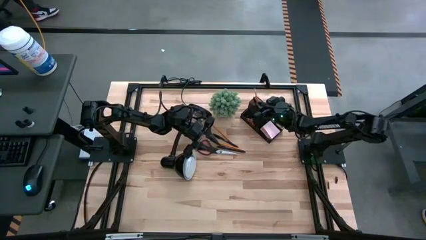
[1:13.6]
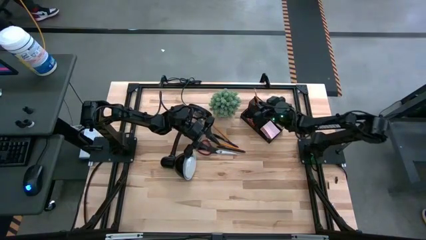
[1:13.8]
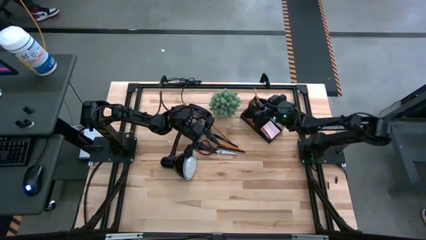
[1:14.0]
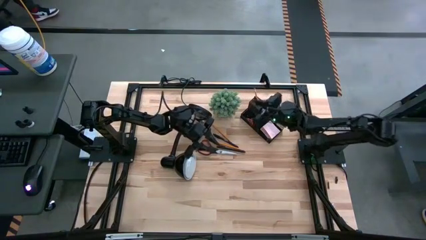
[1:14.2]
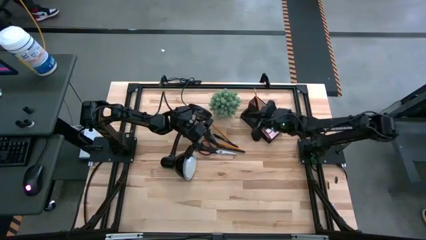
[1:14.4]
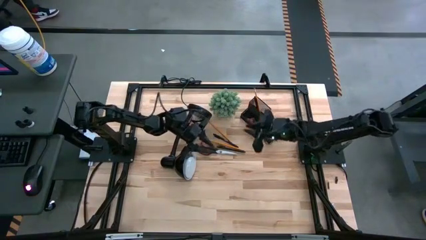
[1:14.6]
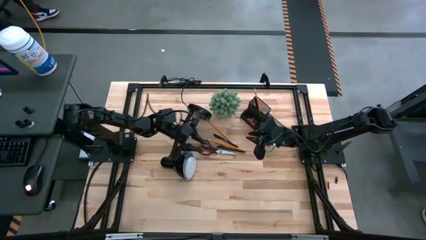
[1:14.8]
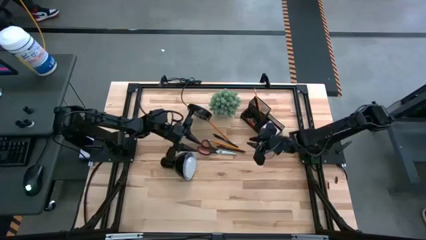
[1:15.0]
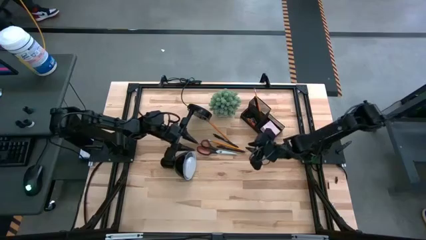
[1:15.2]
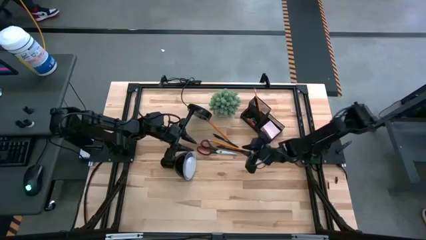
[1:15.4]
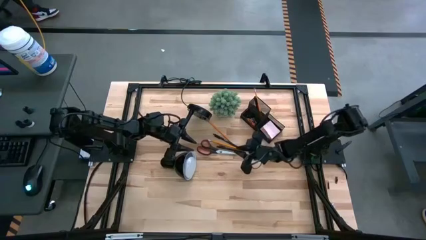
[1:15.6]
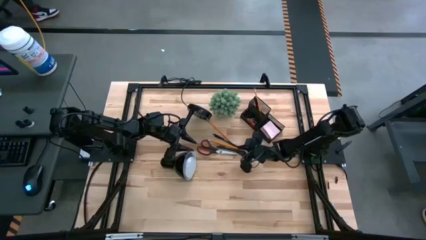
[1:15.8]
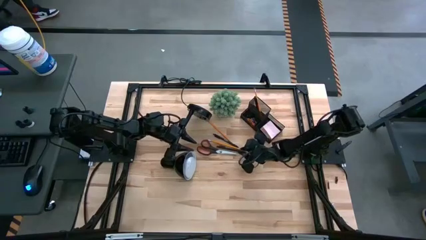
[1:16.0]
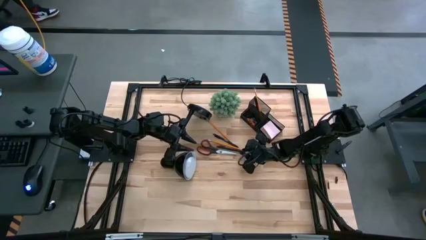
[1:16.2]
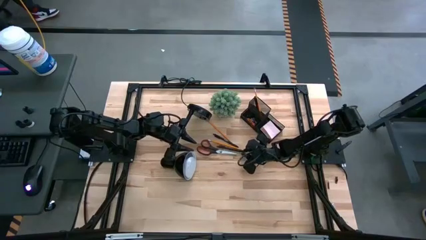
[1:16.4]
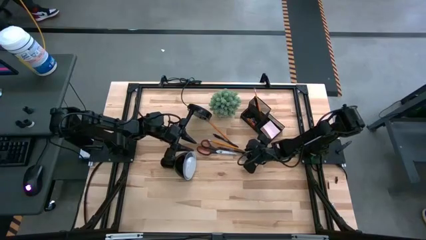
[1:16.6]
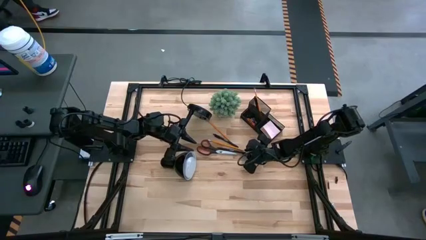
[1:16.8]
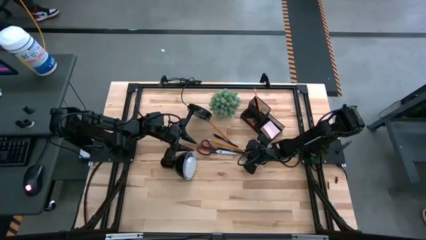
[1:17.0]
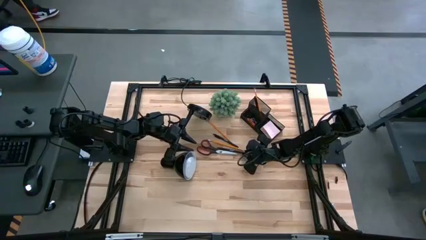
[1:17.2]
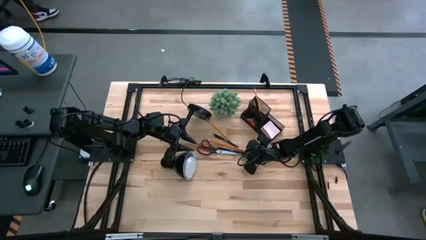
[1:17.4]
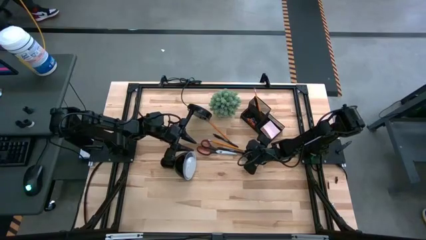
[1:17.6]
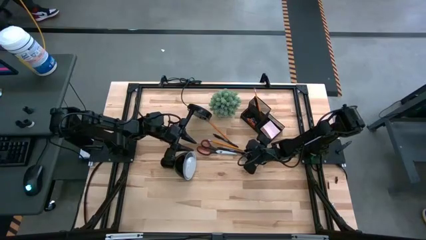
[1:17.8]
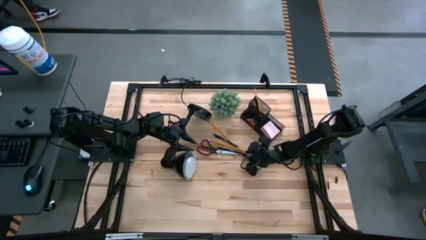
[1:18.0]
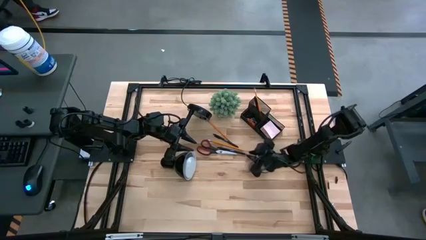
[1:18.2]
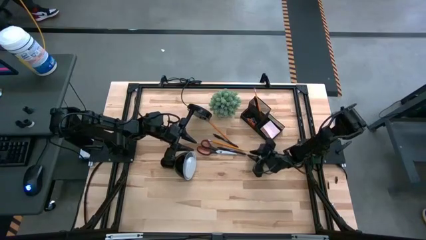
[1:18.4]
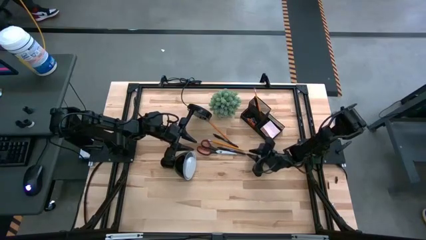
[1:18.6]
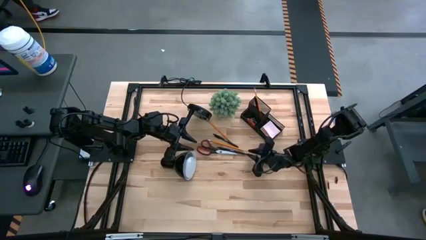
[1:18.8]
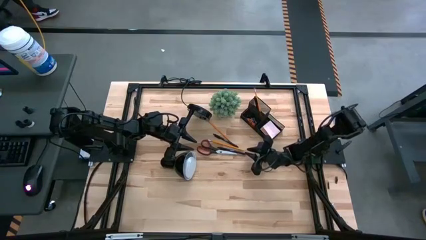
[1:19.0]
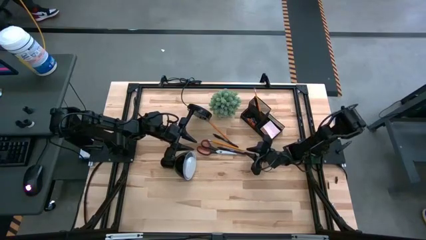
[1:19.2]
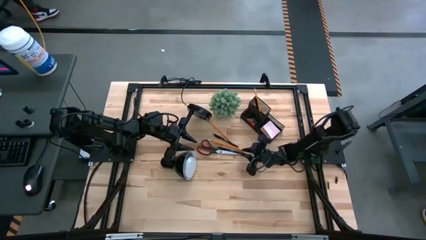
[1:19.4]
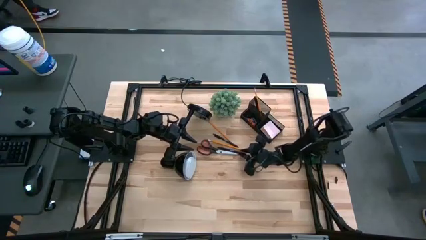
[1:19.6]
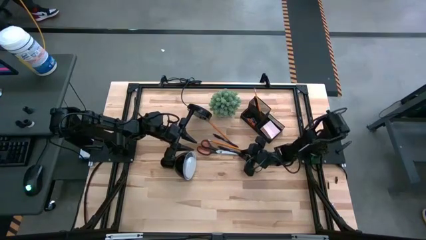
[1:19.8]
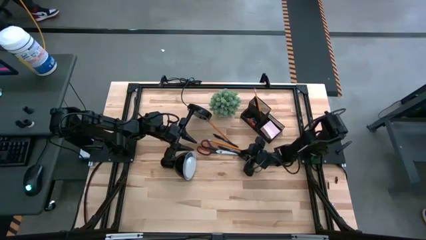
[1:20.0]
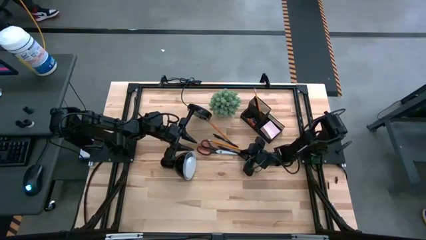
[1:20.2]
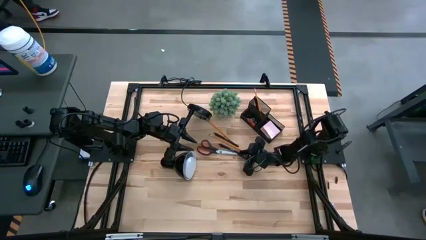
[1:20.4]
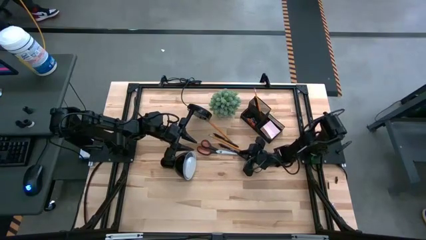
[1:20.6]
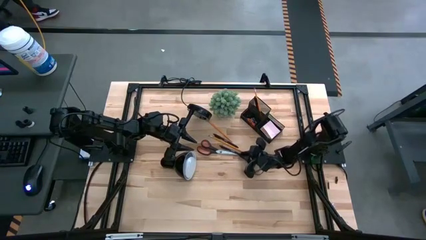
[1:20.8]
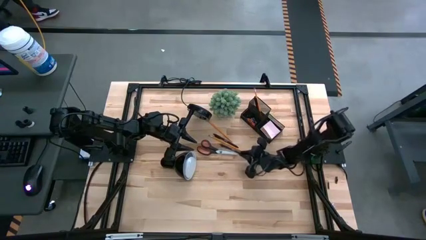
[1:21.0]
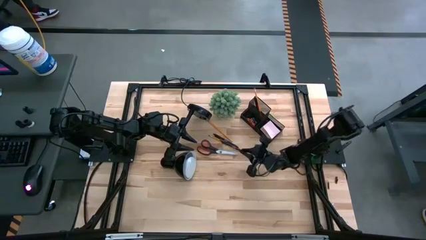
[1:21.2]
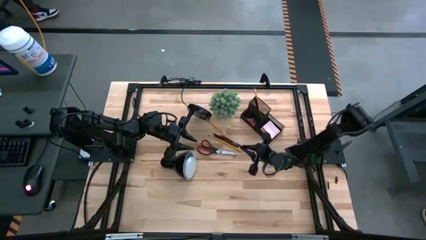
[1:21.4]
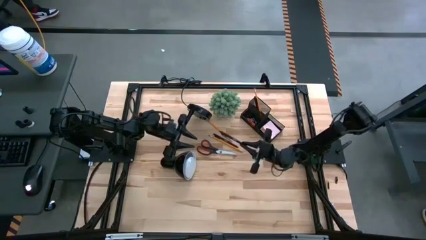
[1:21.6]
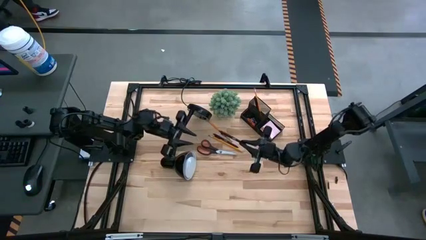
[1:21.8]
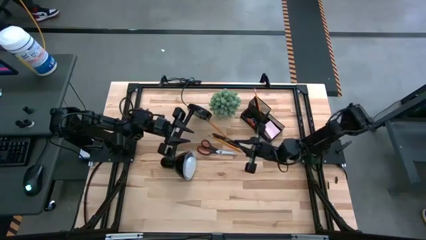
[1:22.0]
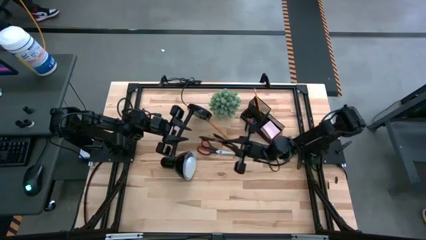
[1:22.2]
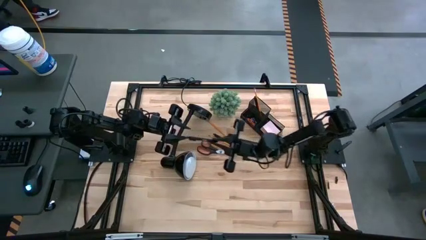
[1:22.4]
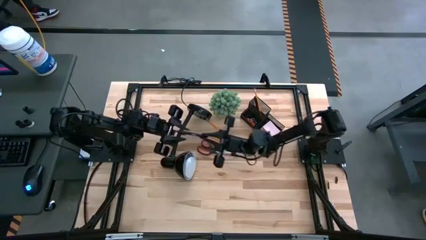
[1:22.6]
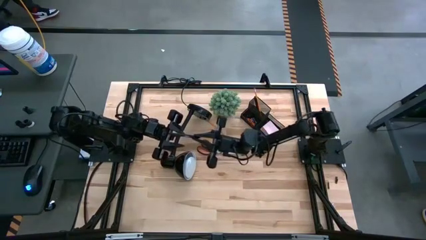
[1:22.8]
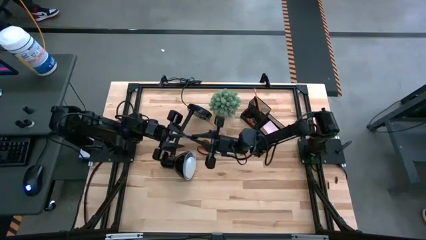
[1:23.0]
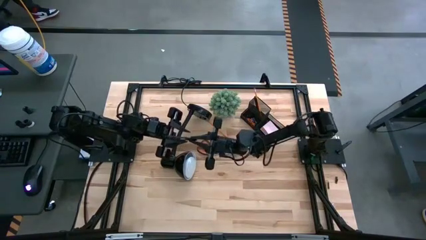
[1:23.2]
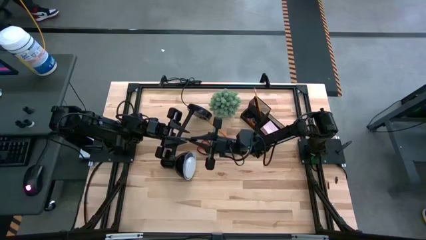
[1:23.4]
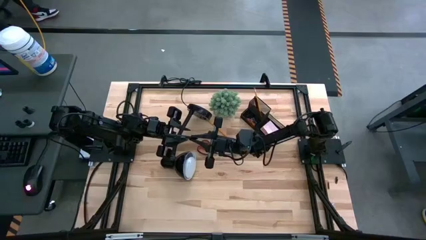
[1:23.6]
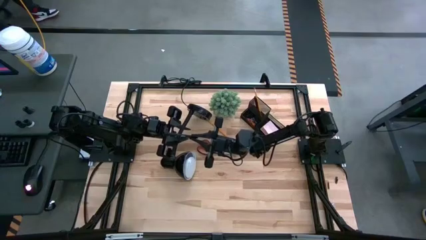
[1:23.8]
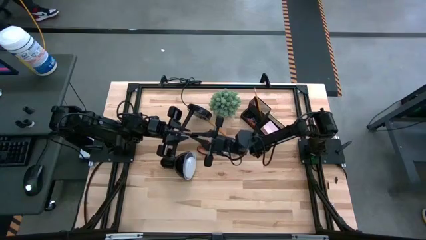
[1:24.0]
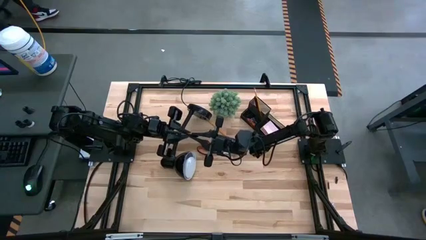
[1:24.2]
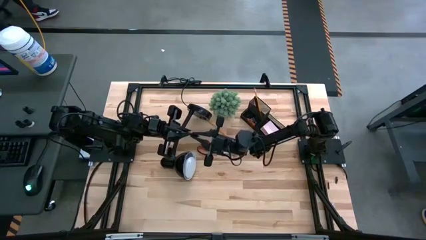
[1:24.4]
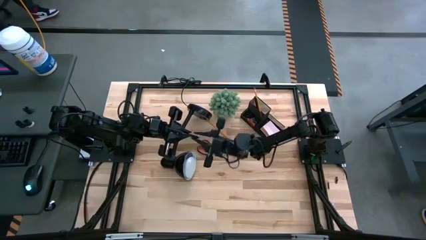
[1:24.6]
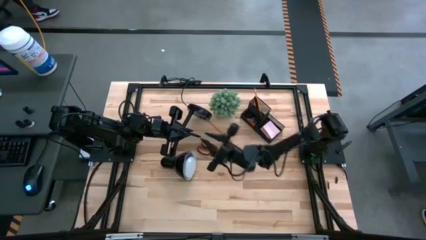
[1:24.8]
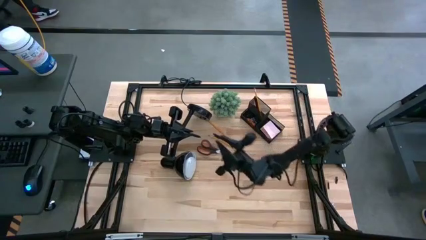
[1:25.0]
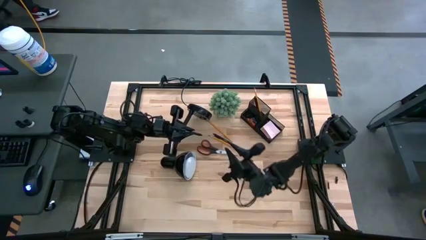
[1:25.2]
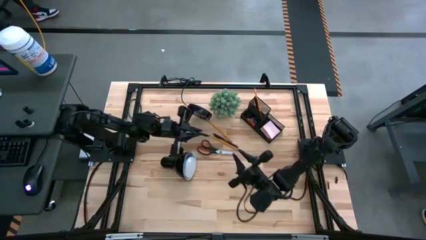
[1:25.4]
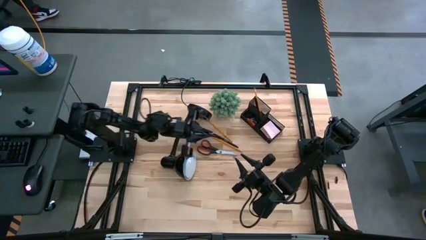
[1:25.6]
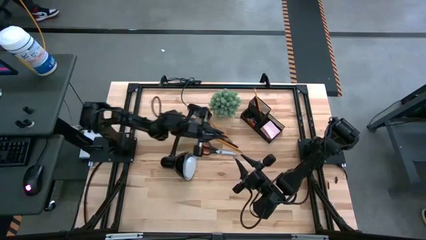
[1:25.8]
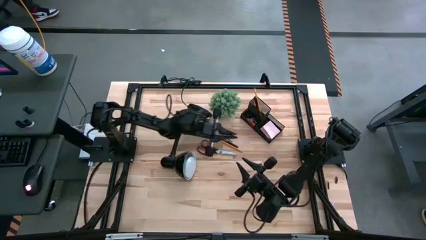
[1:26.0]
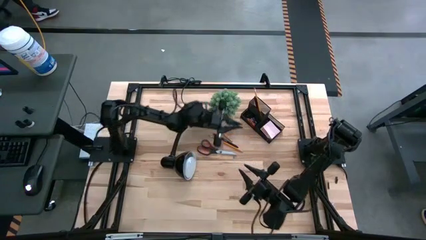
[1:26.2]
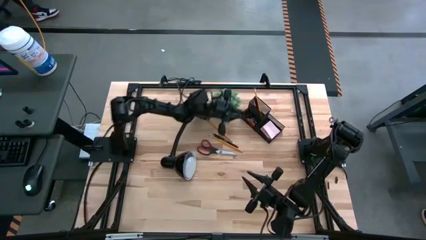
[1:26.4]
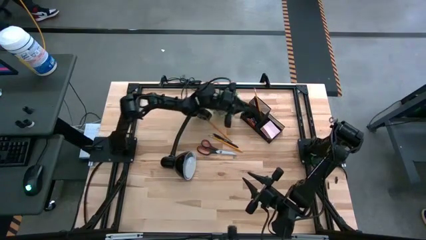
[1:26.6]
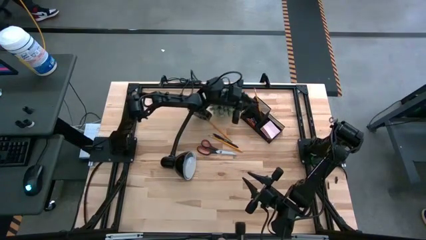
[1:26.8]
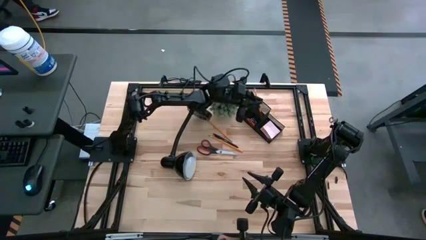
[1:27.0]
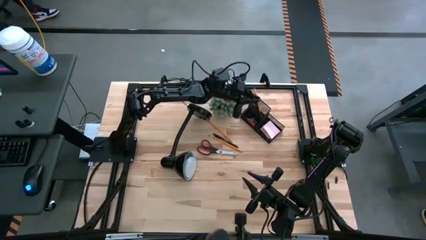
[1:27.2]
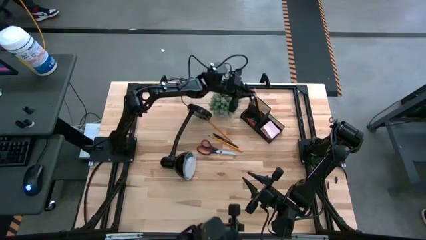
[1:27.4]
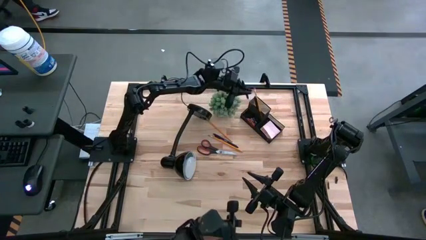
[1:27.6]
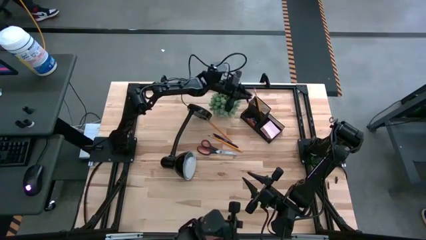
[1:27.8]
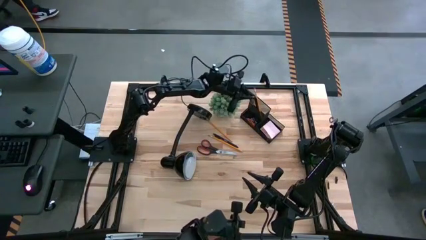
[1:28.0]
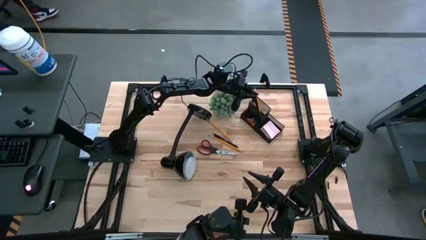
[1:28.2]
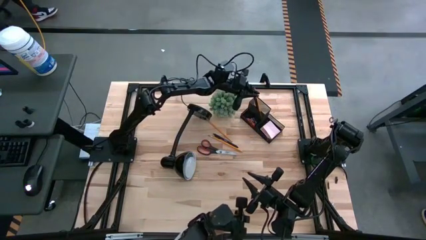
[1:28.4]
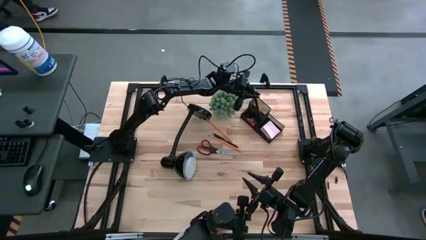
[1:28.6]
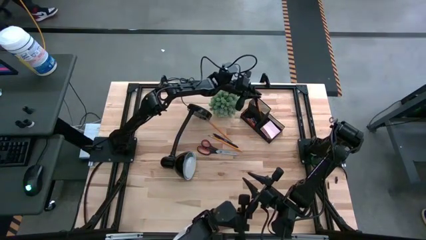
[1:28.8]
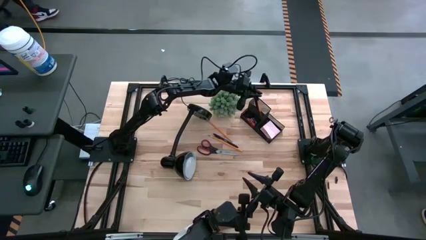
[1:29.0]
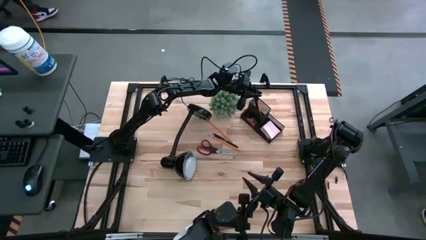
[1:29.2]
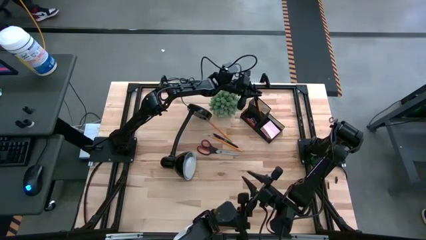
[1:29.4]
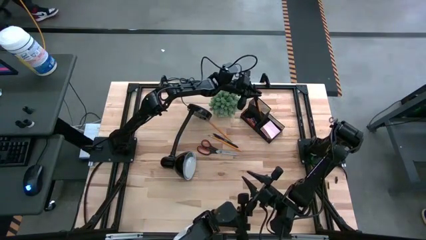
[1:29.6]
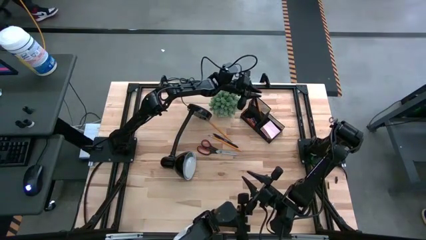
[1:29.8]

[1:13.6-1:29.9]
Task: Pick and place office supplies into organizer
Put the bottom pen into the top left section of the desk organizer
